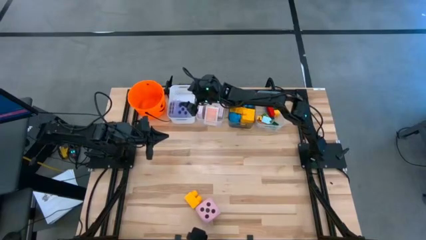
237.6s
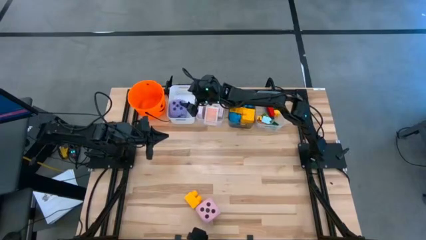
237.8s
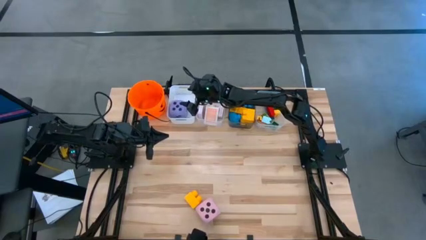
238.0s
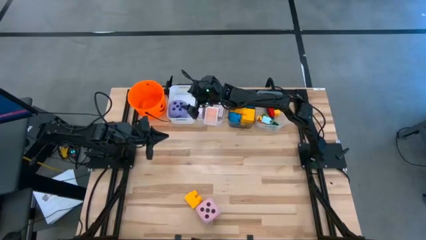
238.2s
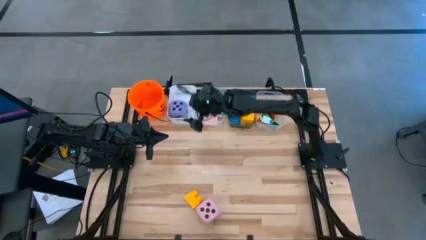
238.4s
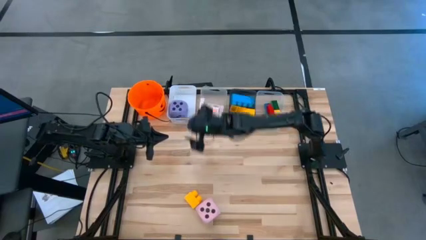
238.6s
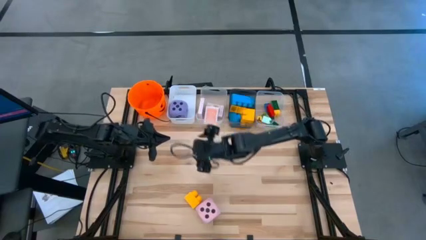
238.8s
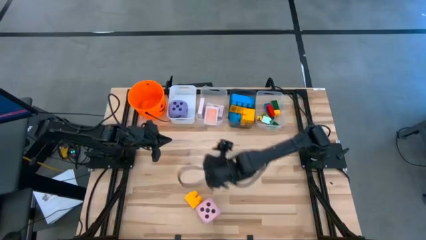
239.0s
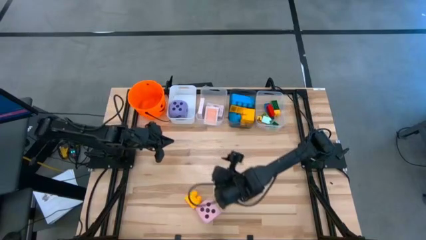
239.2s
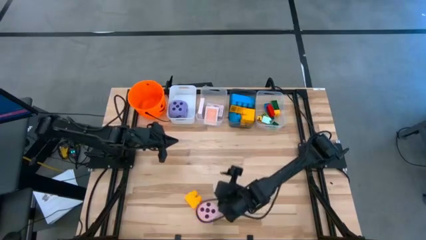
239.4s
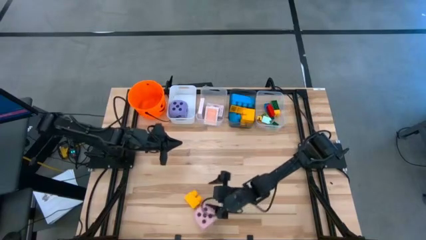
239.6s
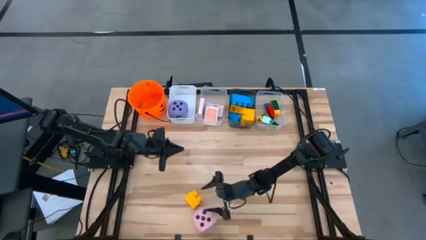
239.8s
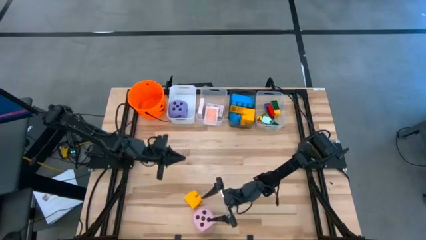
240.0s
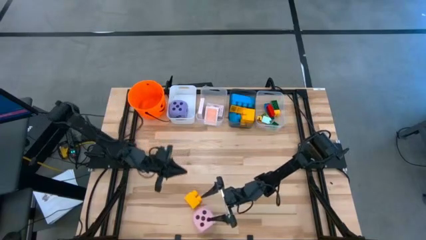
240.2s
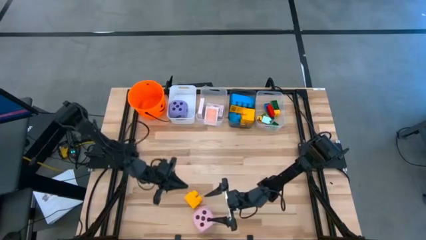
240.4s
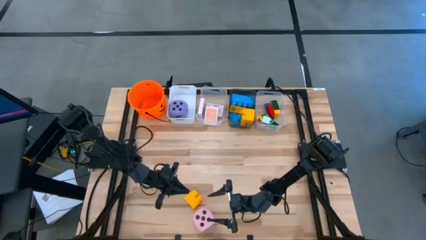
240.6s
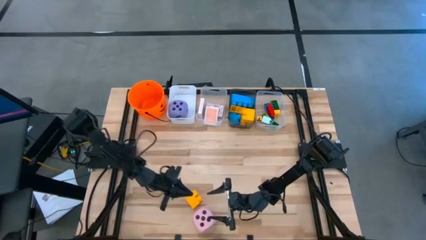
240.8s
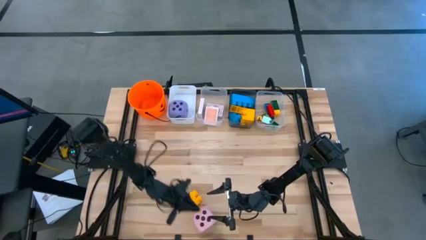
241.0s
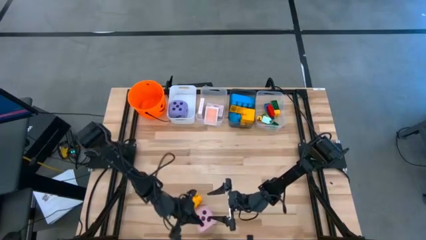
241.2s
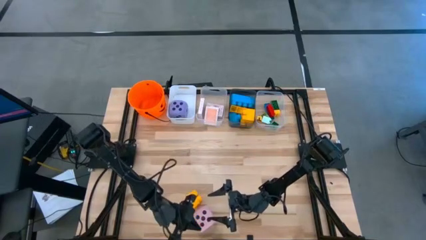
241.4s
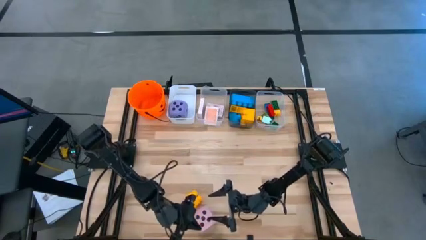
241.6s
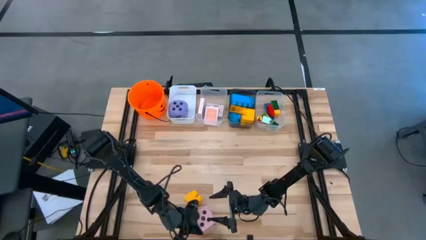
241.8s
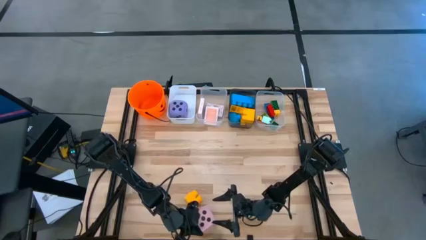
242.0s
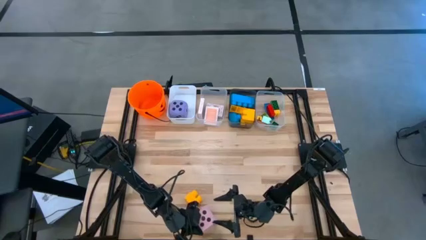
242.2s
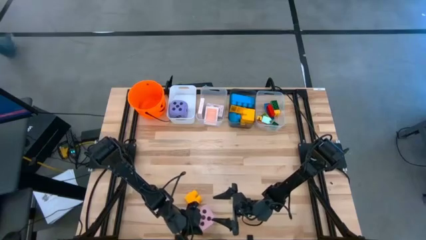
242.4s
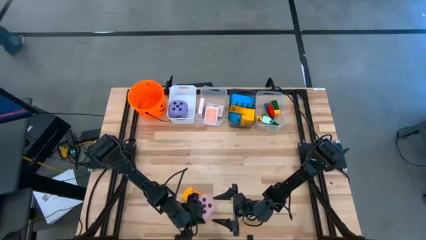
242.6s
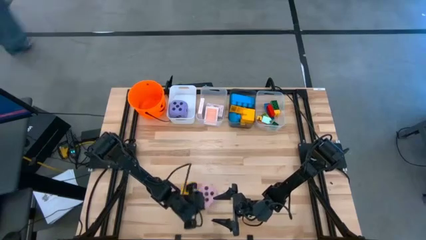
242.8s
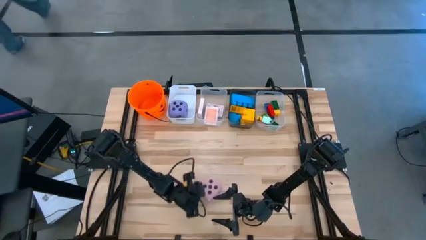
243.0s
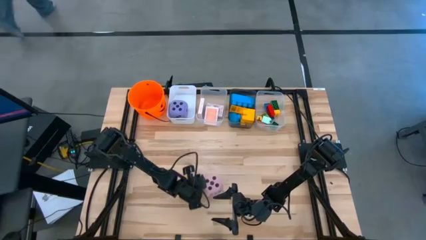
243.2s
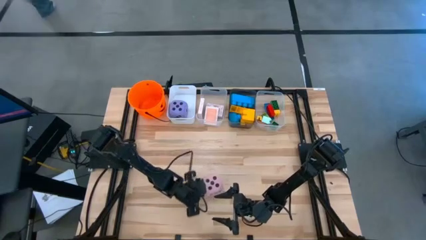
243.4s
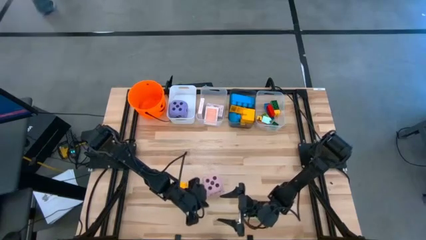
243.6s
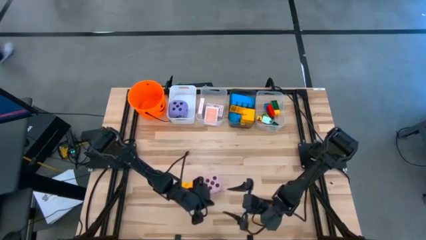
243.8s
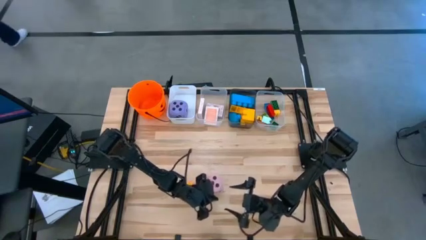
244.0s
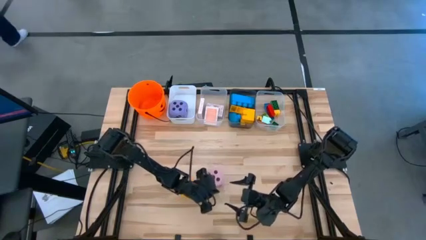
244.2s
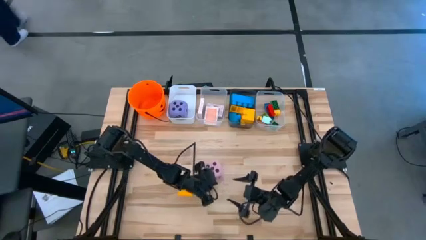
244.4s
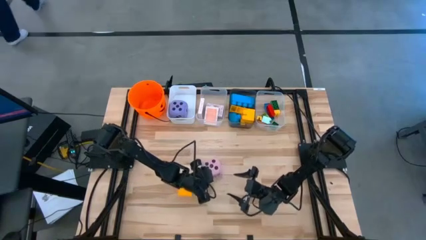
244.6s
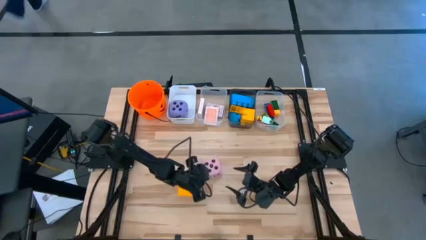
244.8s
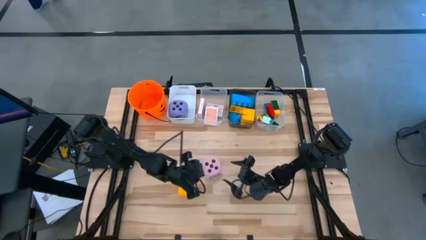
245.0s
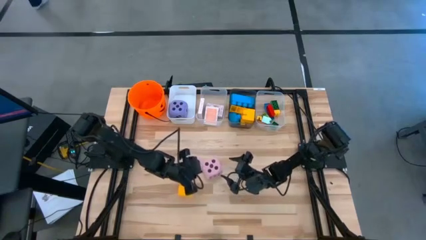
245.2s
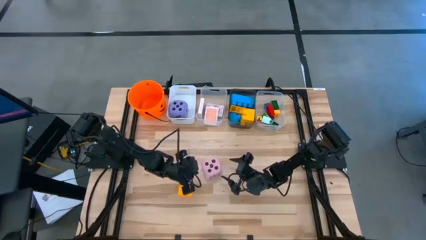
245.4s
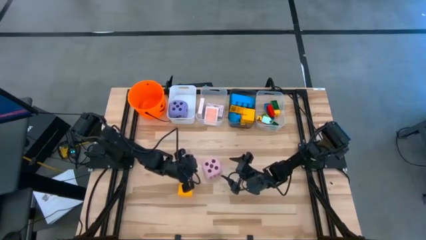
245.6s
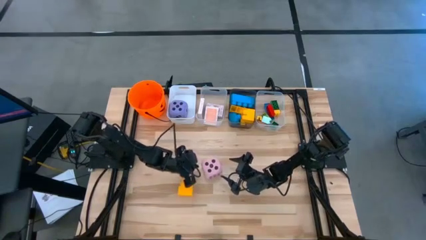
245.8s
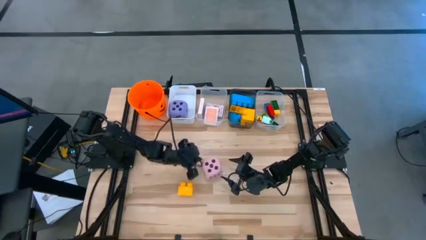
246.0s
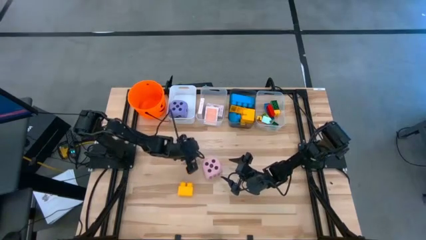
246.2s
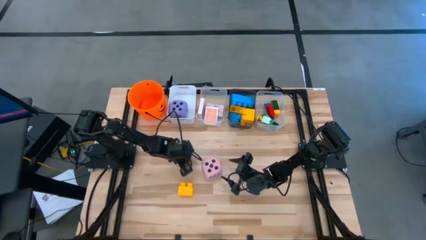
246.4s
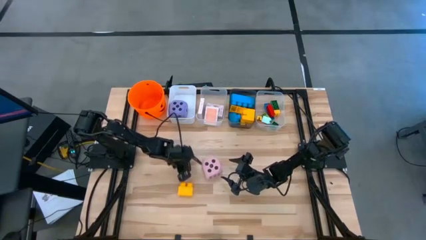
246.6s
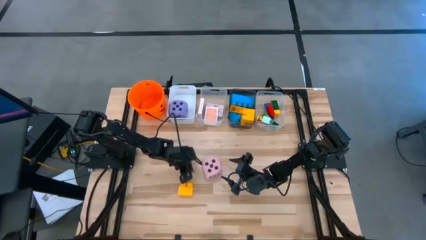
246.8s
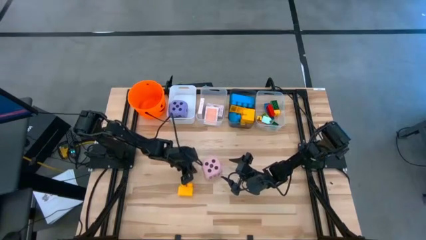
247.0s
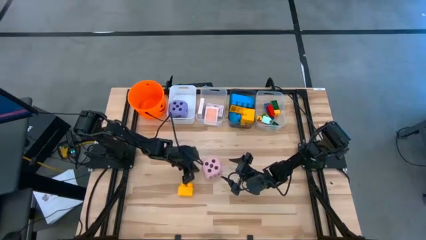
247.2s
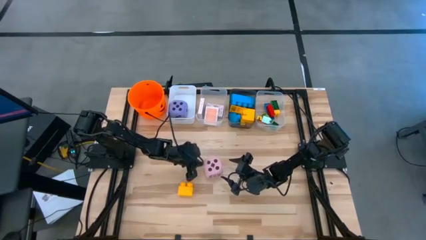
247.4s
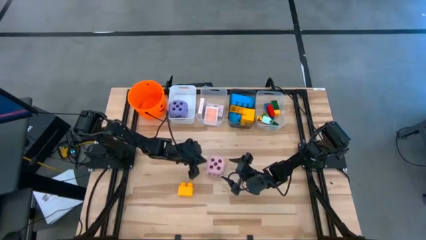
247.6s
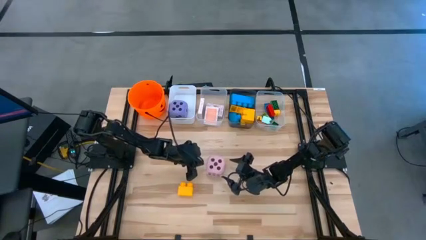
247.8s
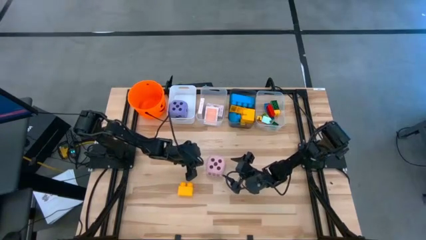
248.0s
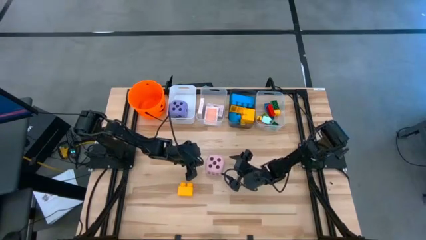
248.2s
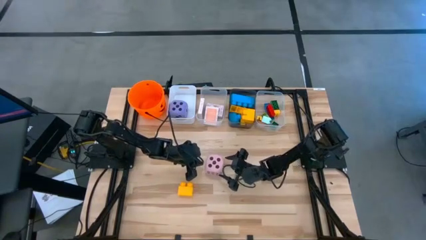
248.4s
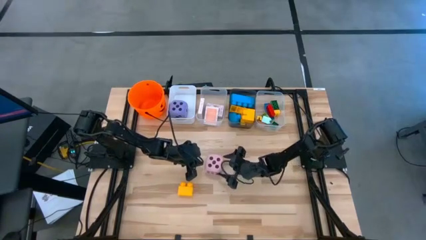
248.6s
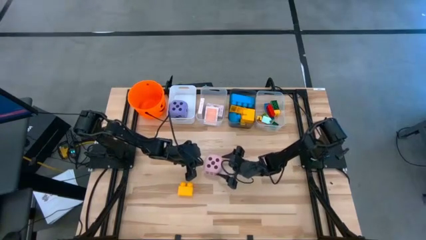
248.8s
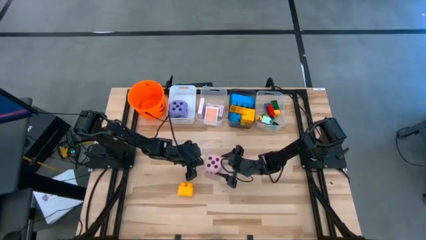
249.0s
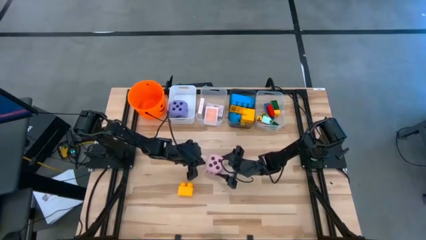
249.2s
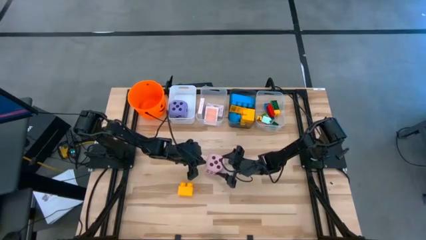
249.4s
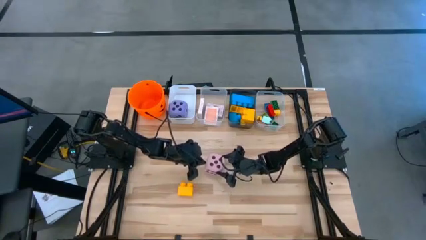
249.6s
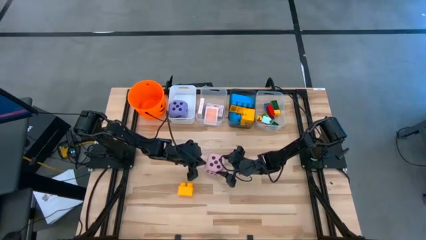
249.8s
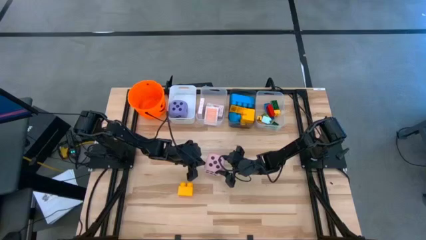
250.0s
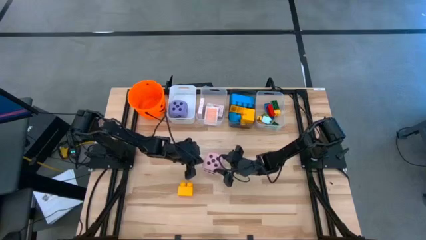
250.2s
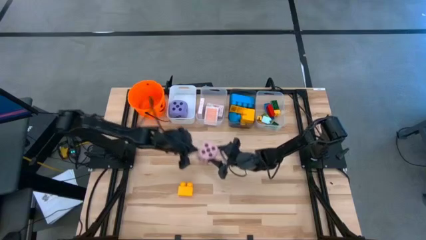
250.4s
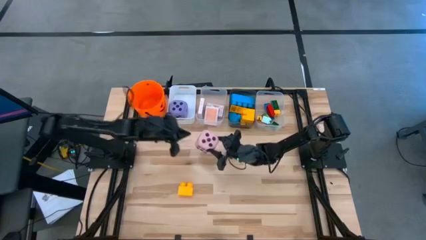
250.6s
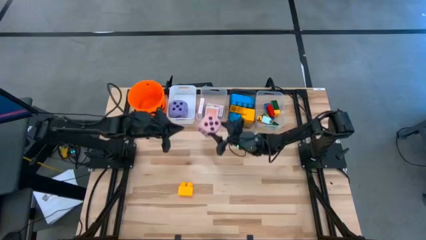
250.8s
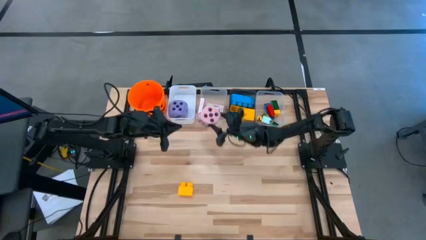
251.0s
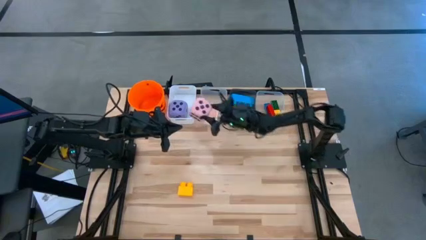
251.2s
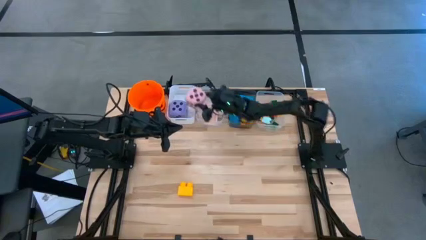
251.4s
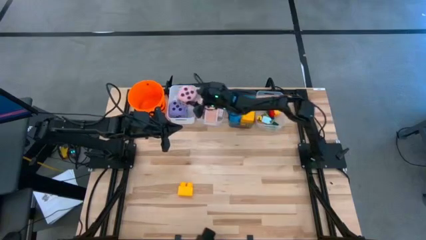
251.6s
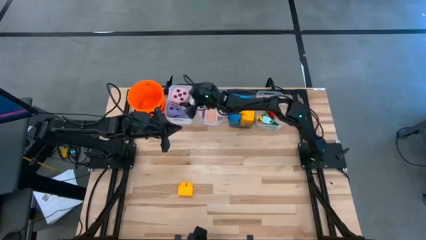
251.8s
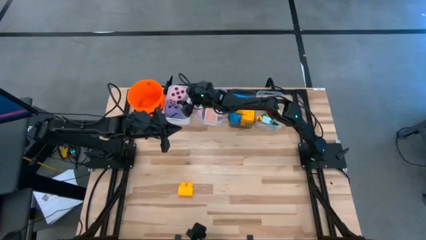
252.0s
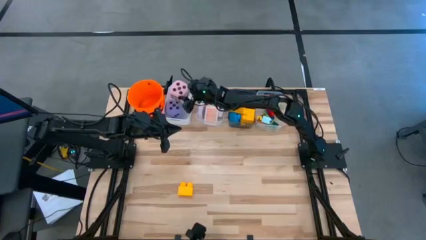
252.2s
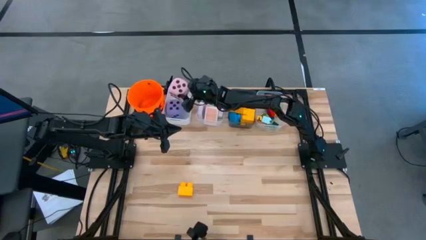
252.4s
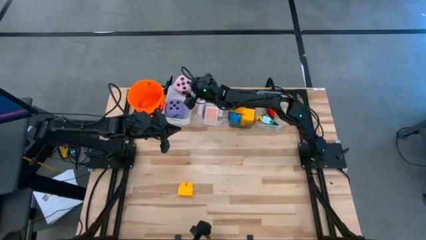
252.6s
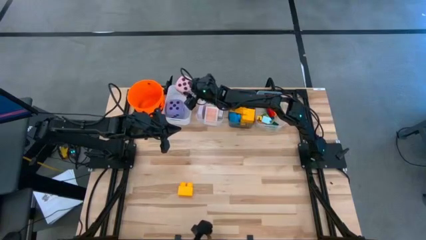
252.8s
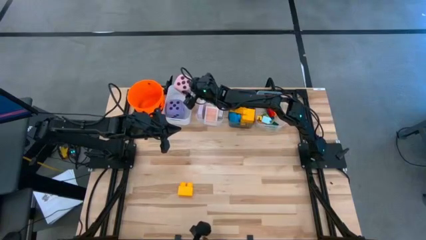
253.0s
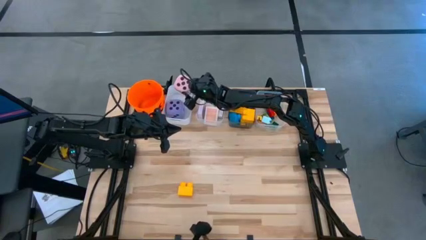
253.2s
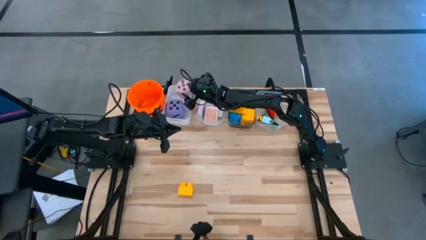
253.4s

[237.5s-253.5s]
Task: Pick & Place Toys
Put the pink die into the white bin

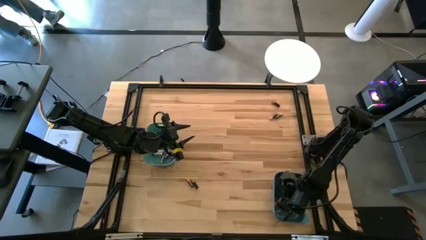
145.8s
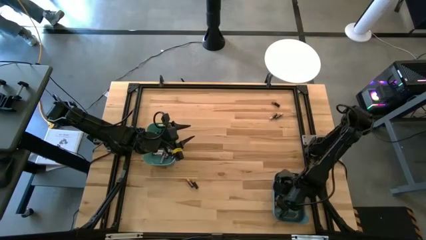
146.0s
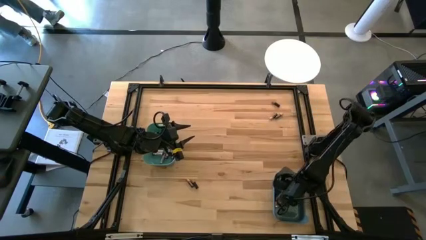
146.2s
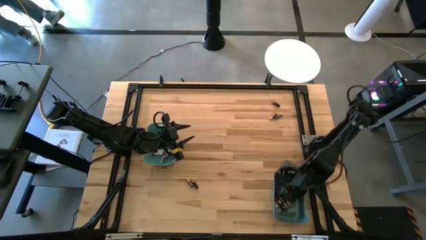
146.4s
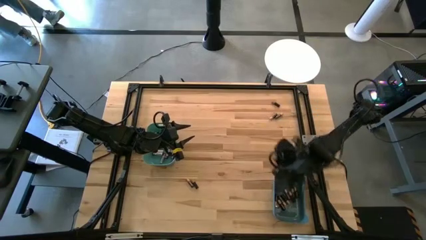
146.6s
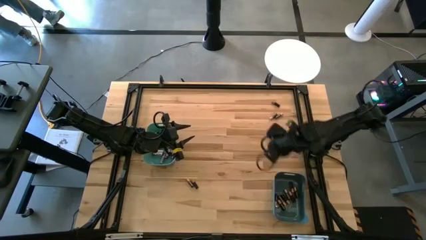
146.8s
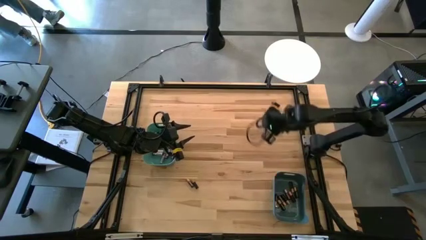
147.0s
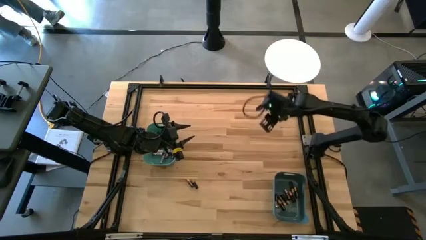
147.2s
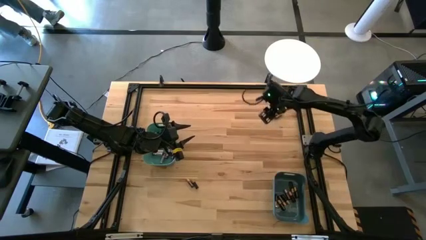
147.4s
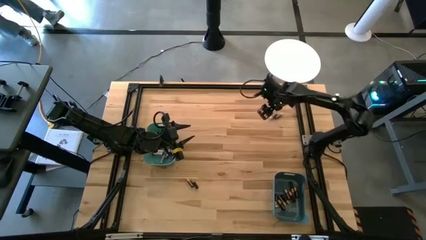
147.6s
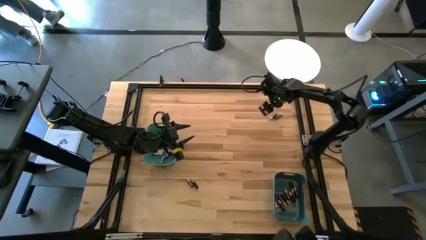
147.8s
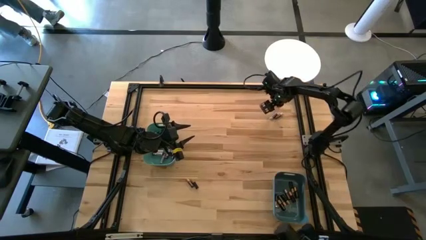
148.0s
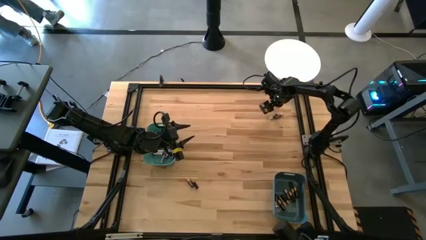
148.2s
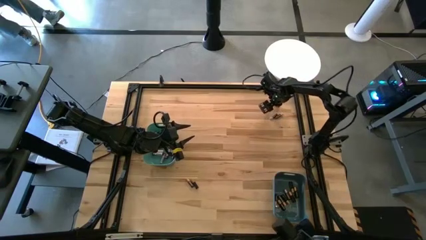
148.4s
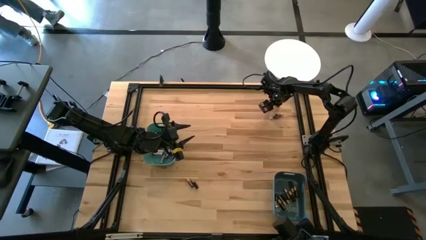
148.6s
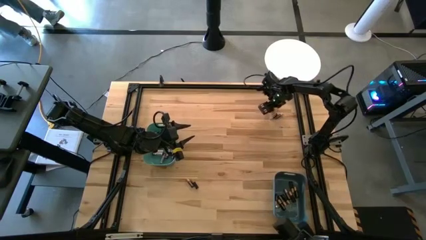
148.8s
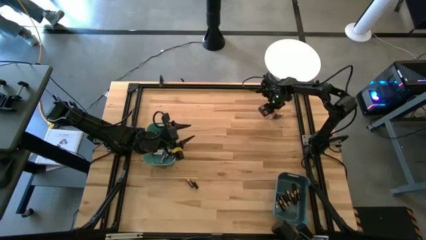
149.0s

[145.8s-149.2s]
Task: Sort batteries
Put the black battery into the blue bin
